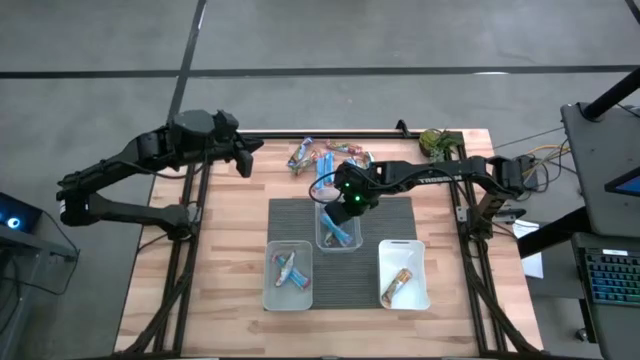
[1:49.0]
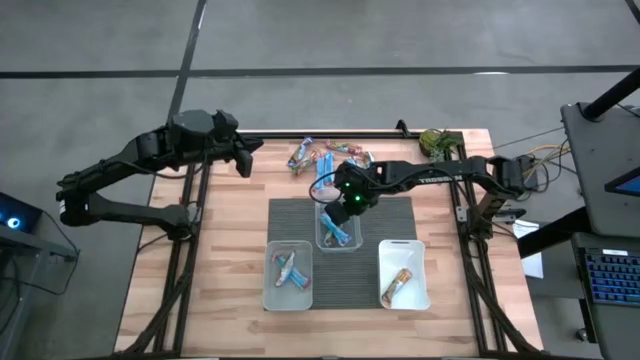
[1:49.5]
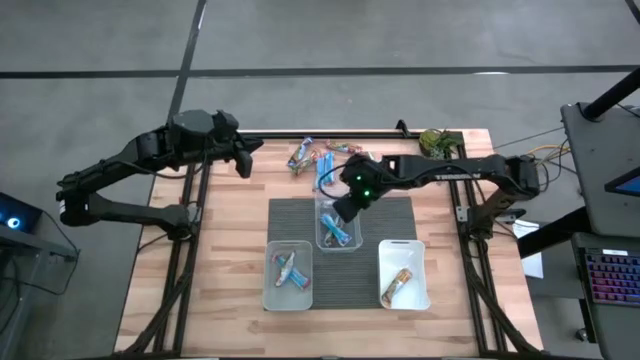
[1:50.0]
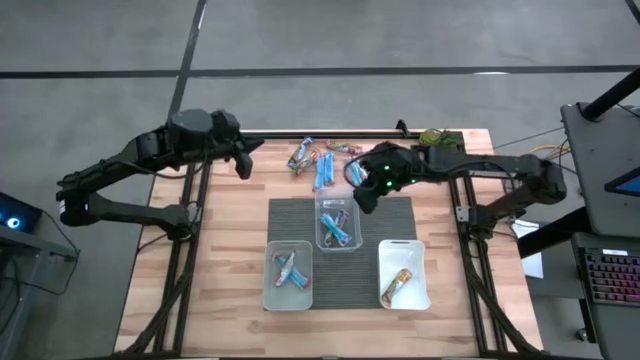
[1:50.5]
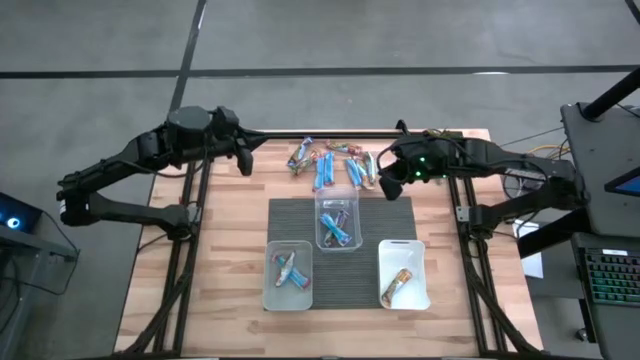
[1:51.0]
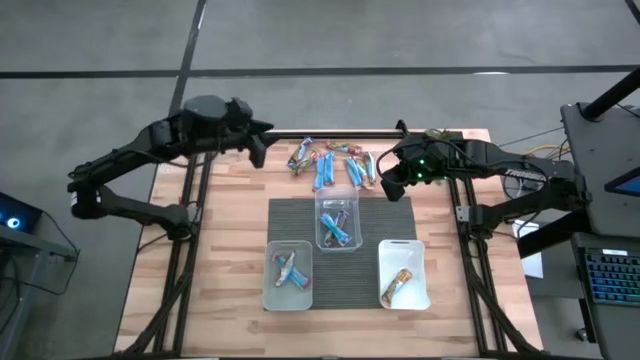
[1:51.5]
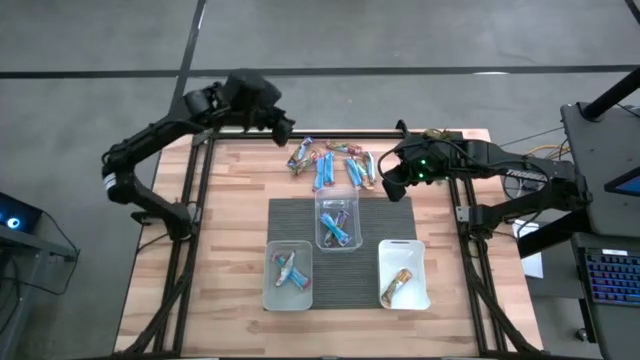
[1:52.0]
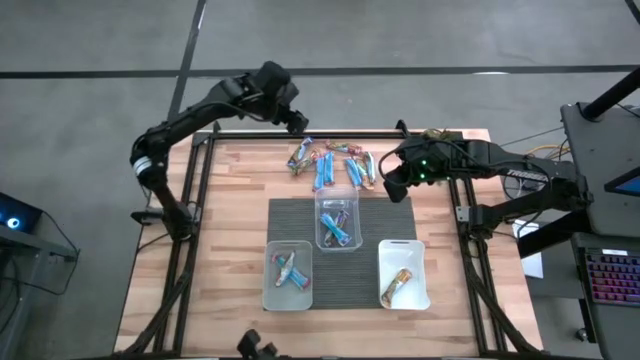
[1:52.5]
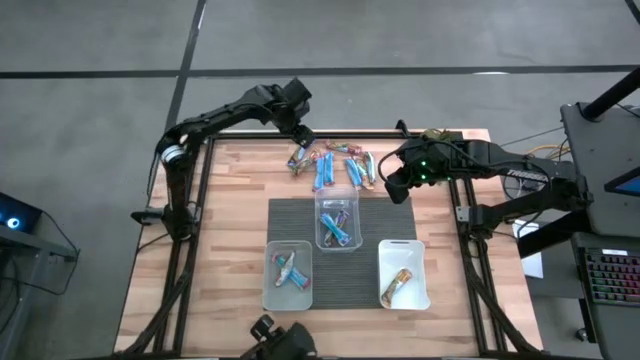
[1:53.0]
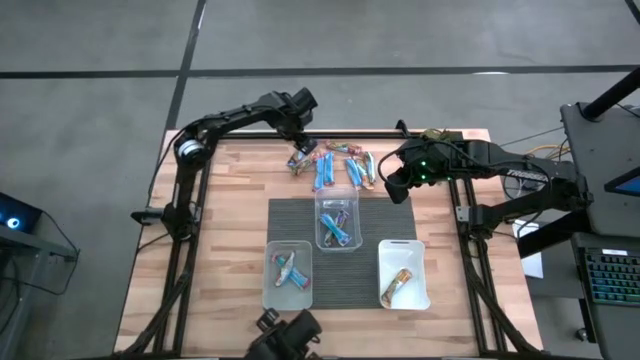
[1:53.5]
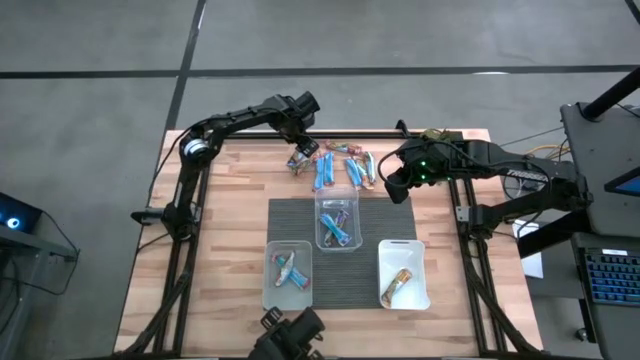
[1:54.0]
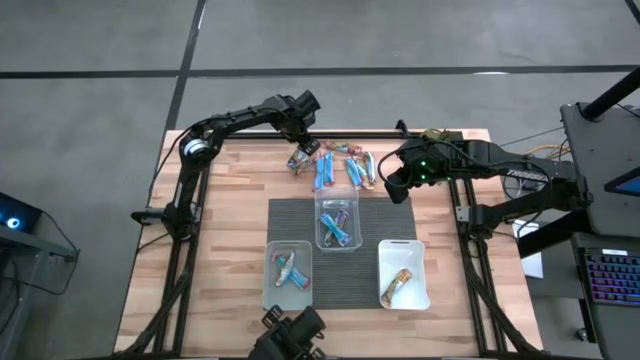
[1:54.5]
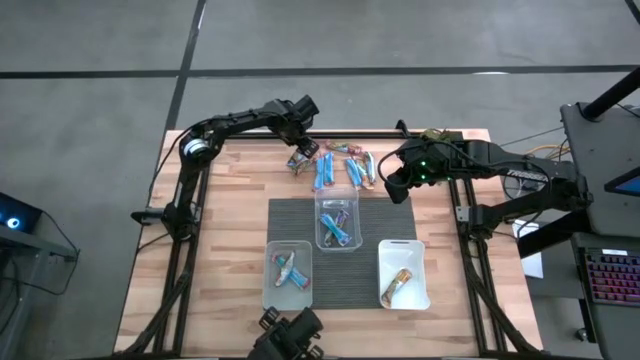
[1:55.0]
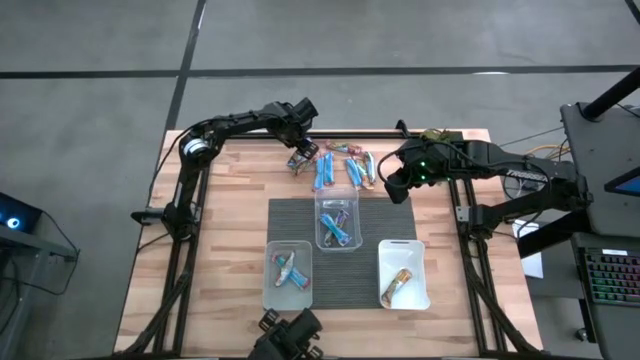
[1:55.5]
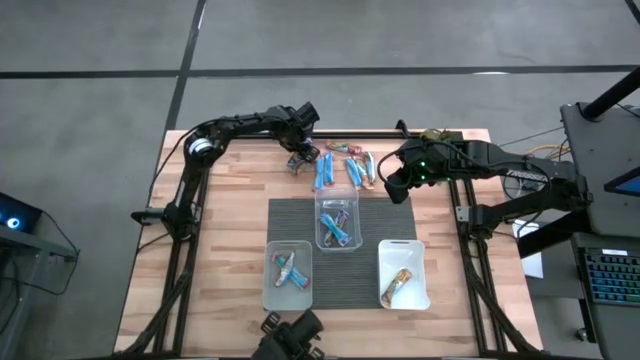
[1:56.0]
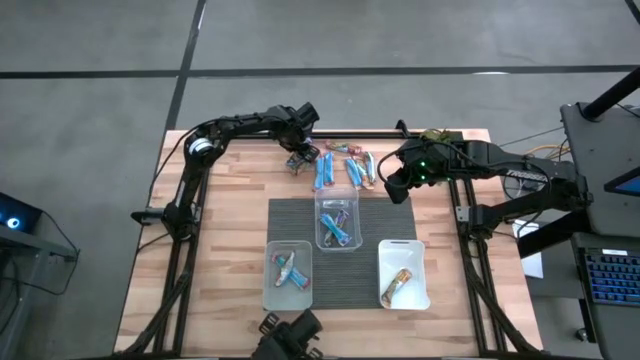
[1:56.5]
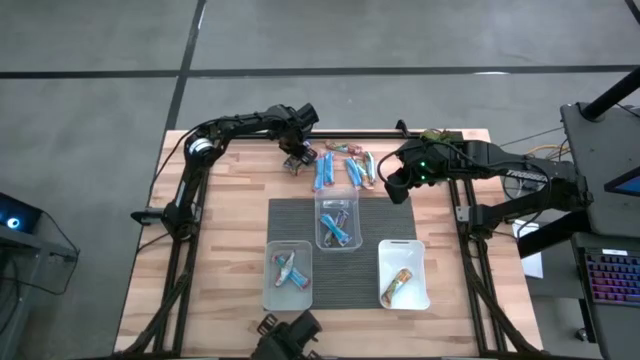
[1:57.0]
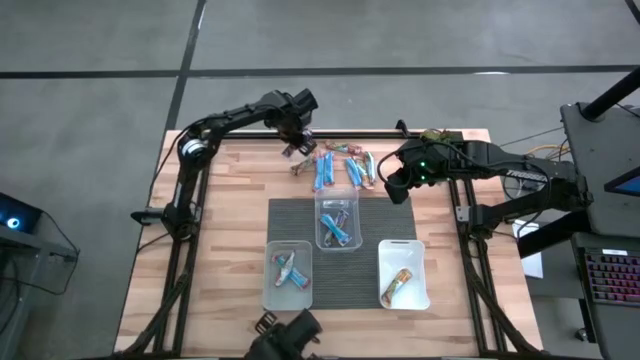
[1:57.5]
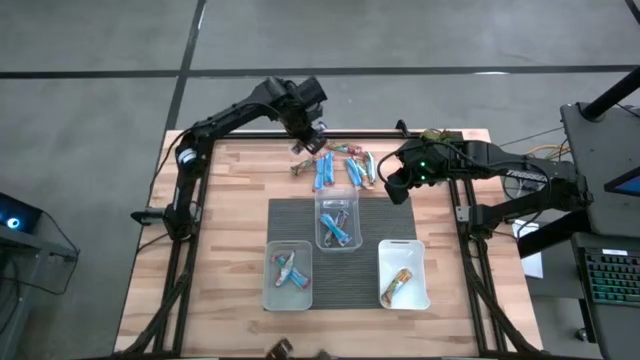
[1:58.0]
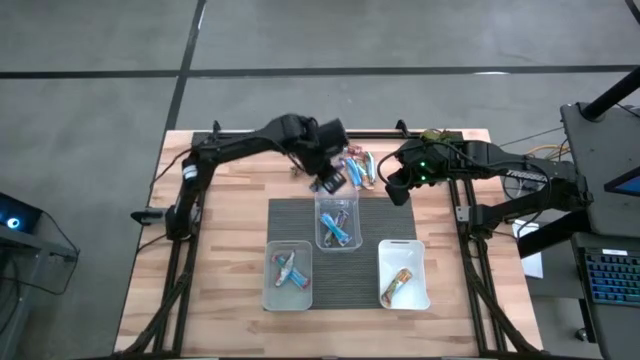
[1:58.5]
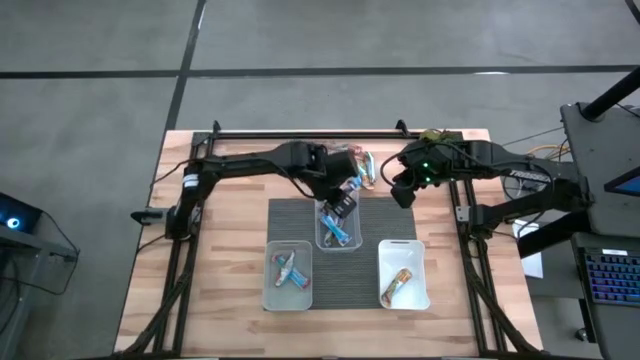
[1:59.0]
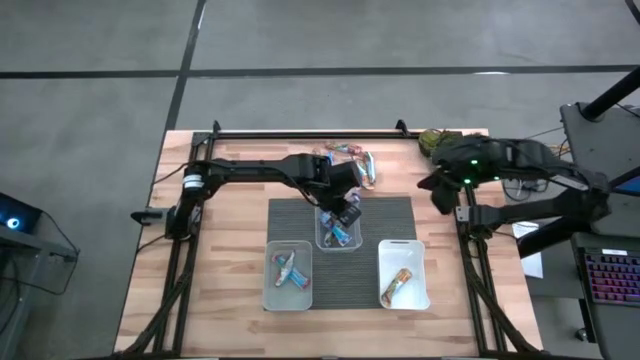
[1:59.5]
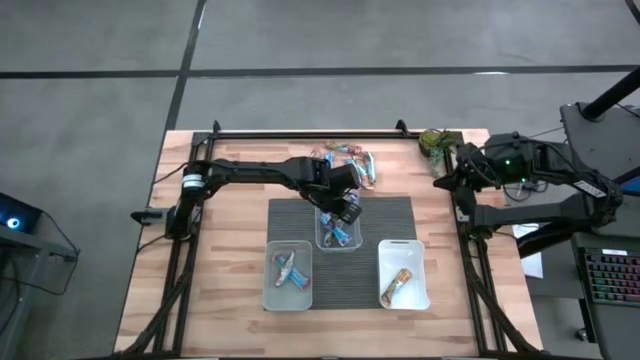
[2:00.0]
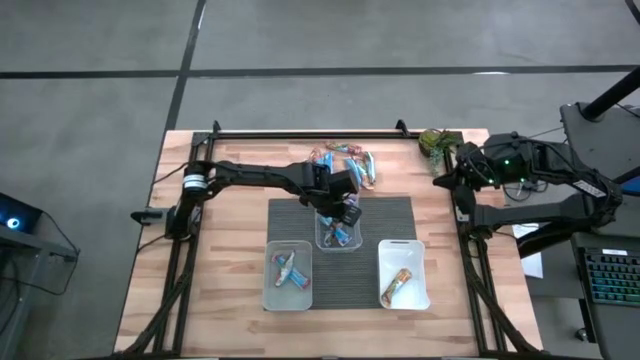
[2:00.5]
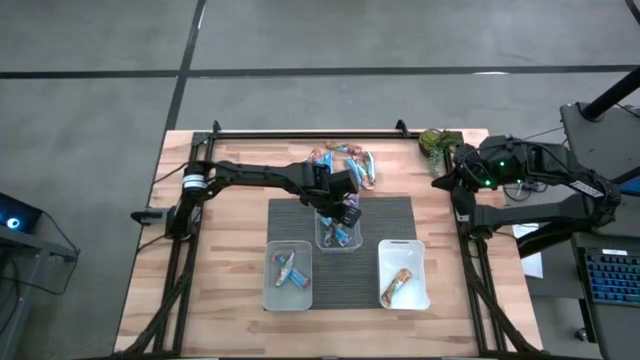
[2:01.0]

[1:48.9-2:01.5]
Task: Pick and place Granola Bars by type
Put the blue granola bar into the transparent bin

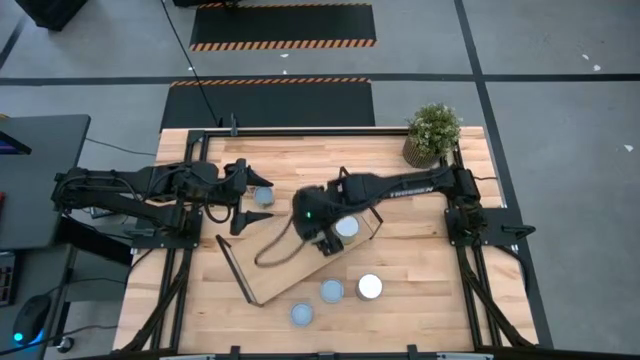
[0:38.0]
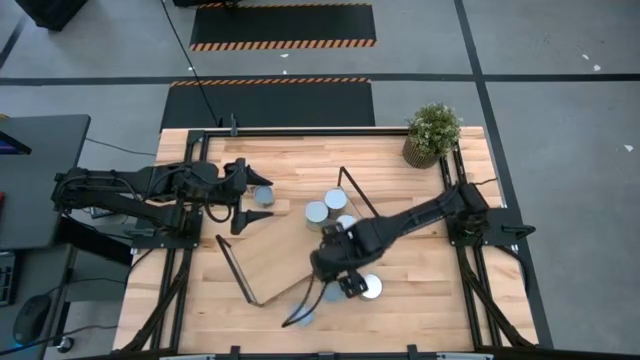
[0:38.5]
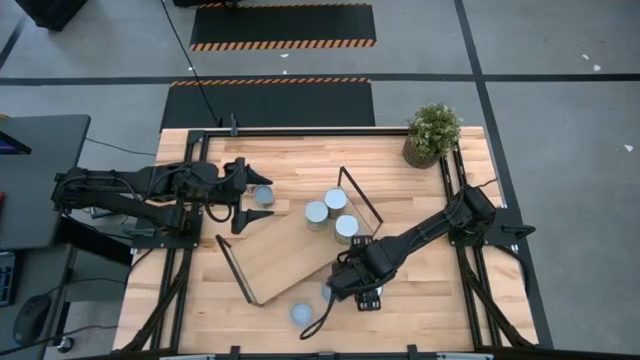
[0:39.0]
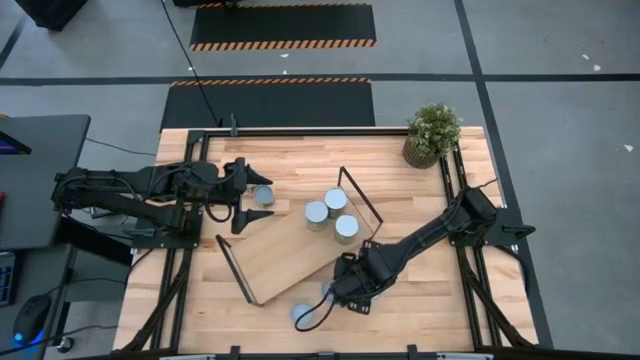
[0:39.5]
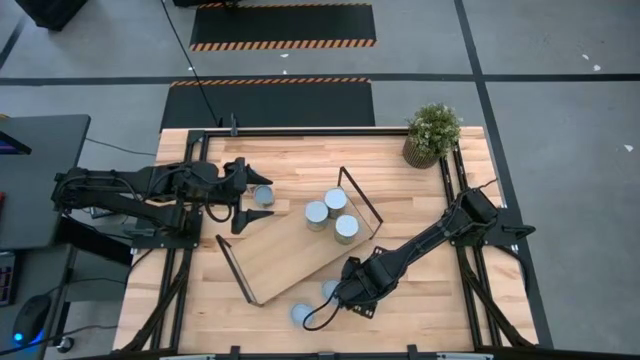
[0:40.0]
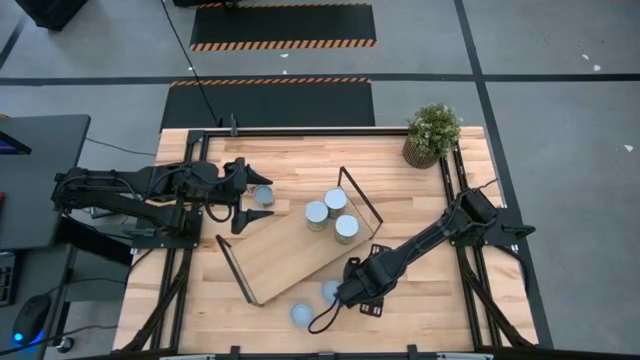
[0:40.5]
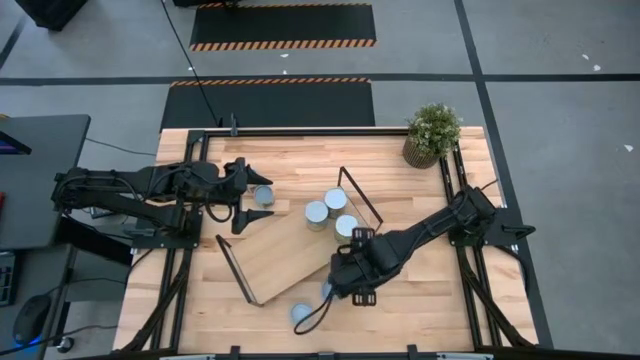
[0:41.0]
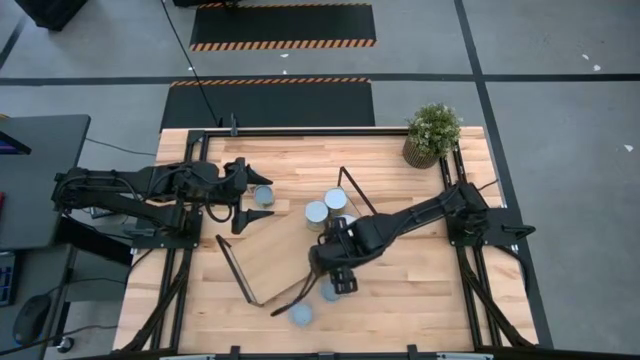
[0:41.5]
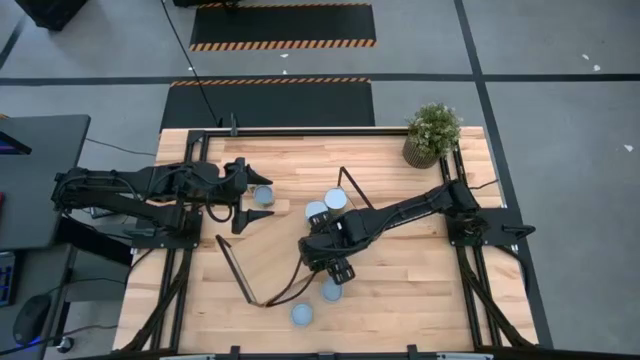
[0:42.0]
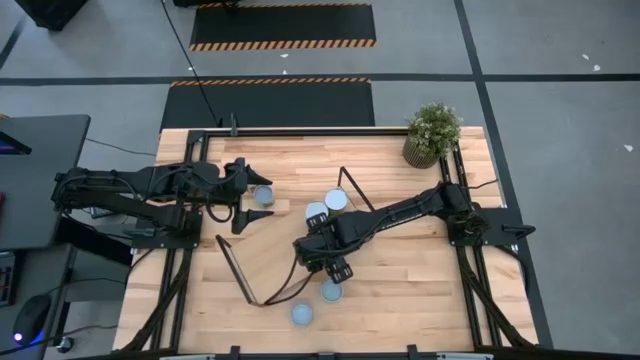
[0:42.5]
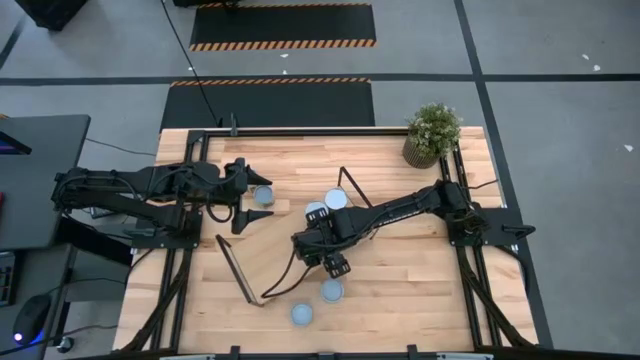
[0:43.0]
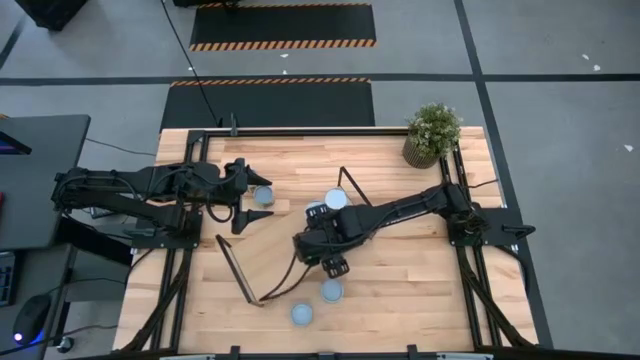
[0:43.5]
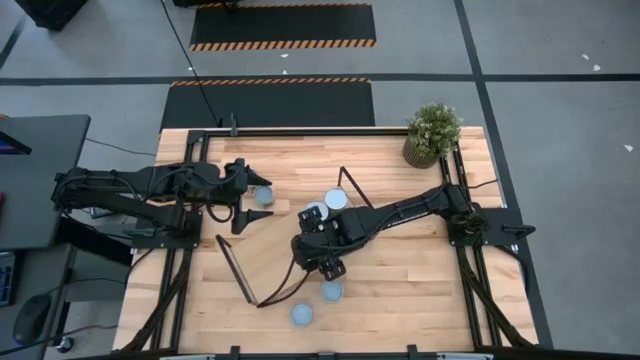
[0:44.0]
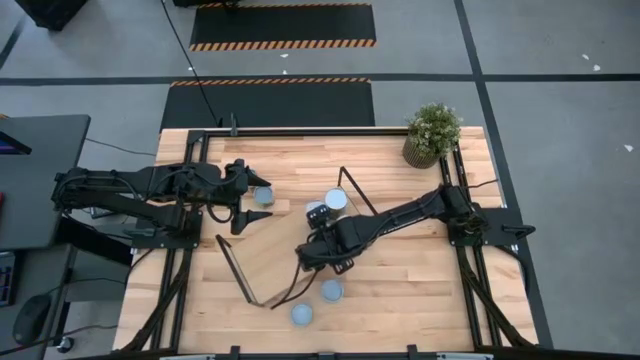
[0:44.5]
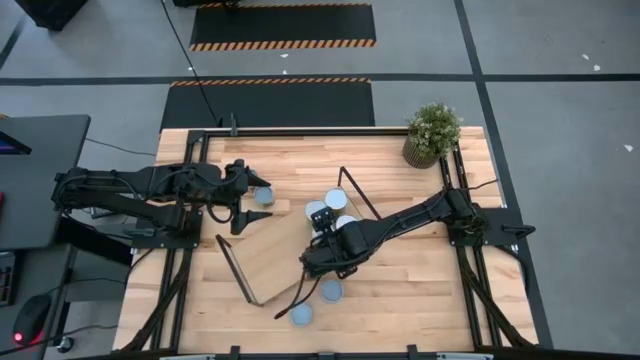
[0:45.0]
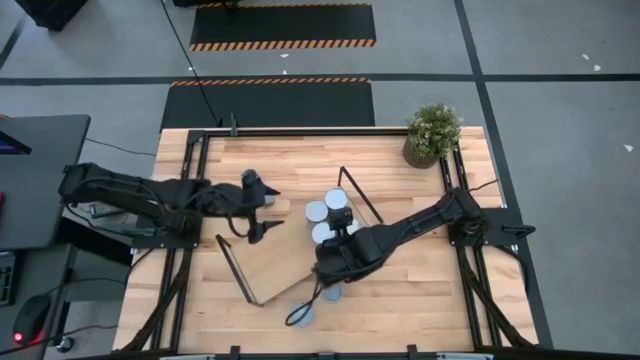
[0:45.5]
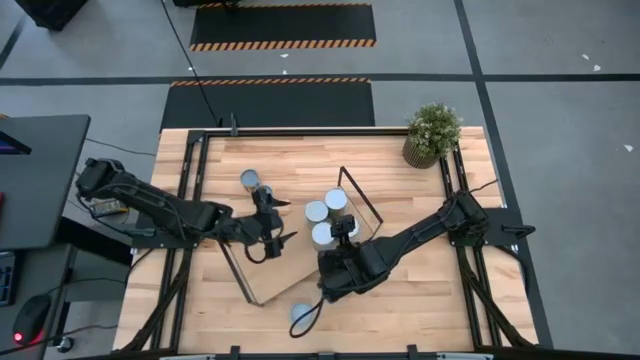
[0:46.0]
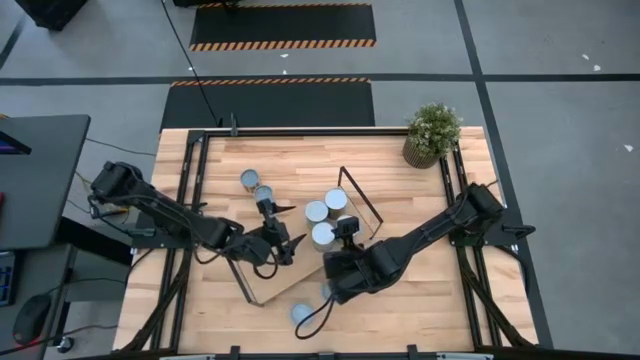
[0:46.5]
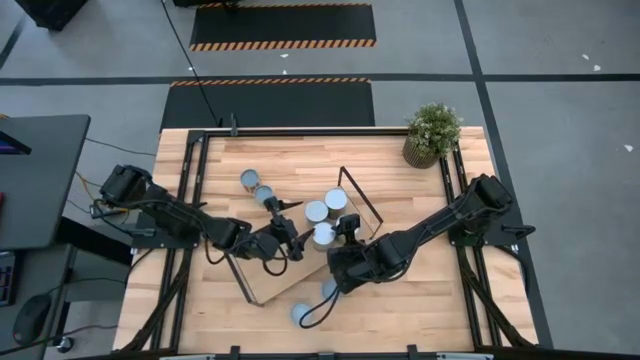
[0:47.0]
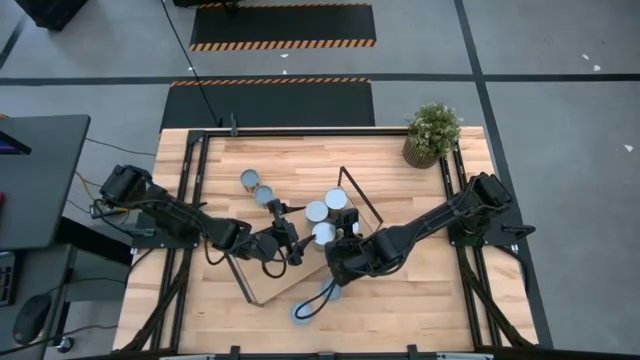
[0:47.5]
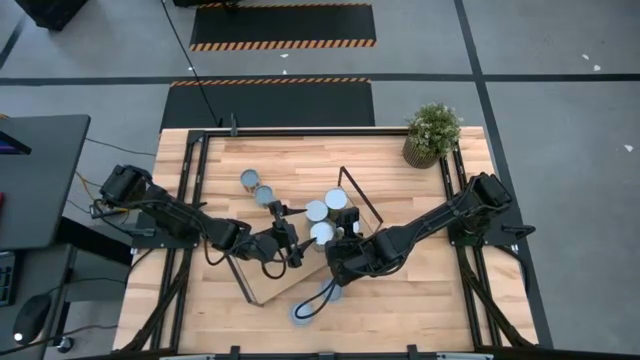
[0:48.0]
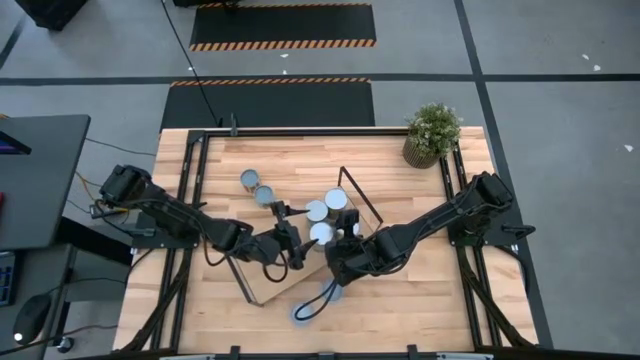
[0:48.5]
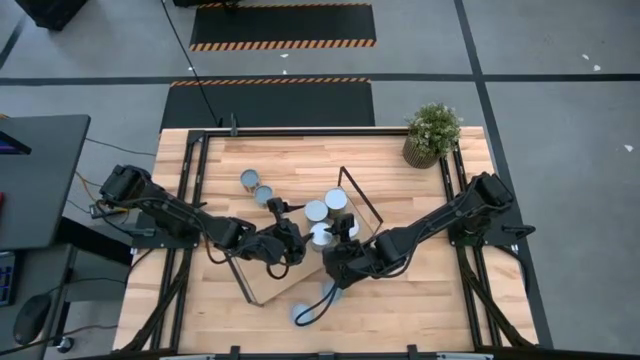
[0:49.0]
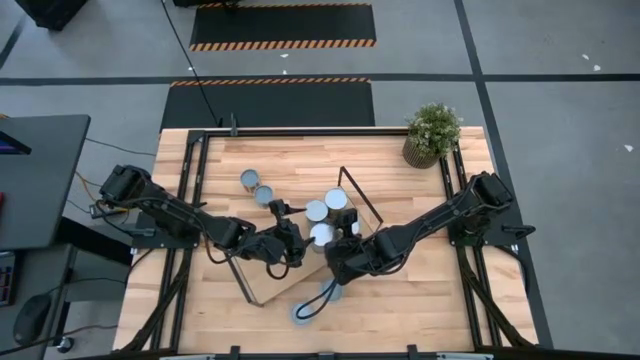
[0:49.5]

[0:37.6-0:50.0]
Task: Pick and place cans onto a shelf
Put the canned peas on the shelf
